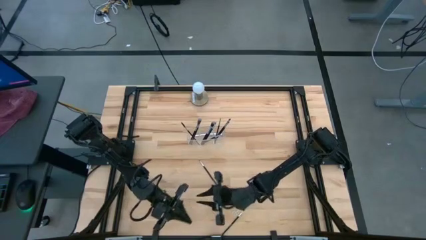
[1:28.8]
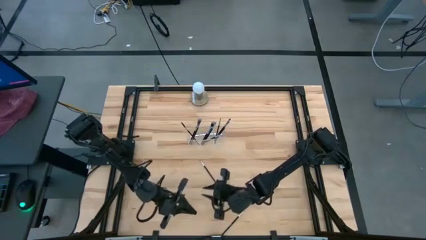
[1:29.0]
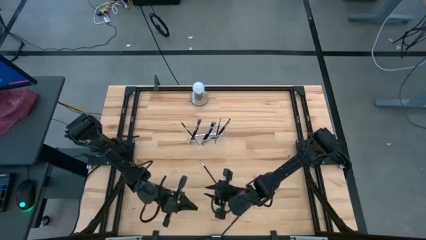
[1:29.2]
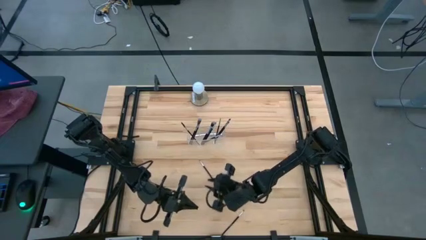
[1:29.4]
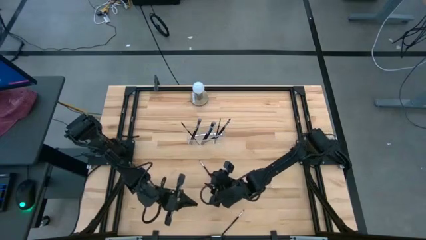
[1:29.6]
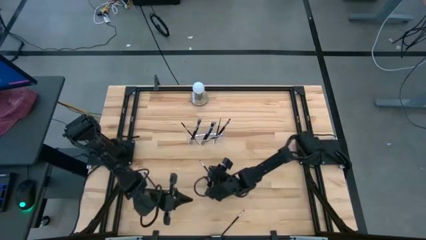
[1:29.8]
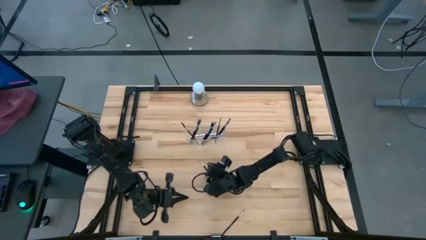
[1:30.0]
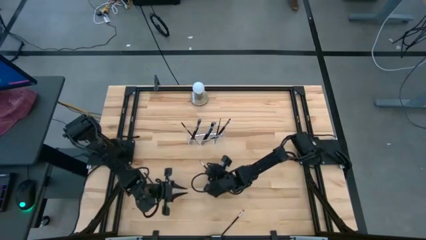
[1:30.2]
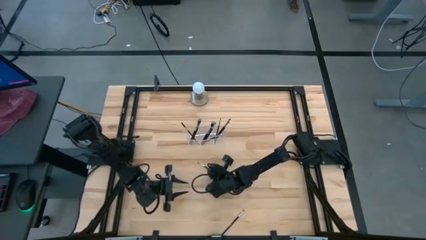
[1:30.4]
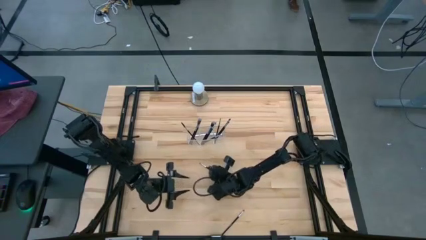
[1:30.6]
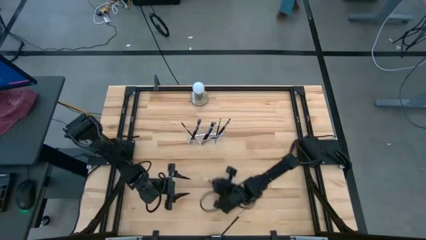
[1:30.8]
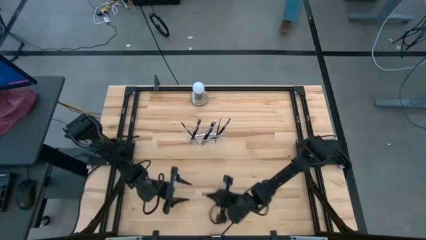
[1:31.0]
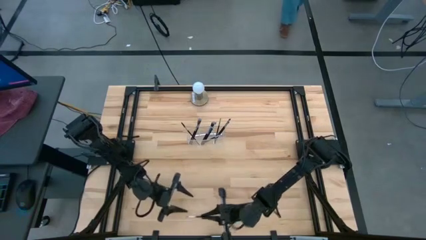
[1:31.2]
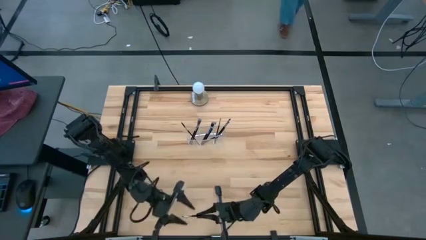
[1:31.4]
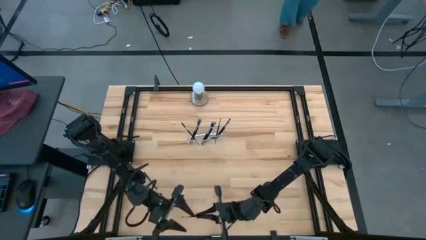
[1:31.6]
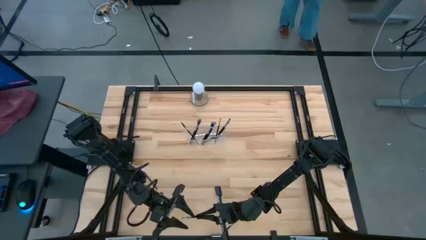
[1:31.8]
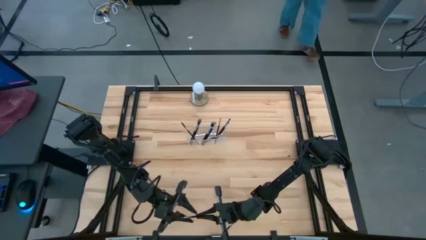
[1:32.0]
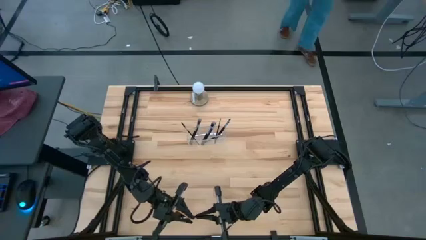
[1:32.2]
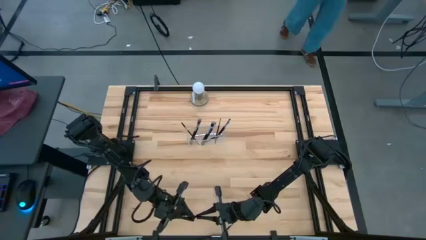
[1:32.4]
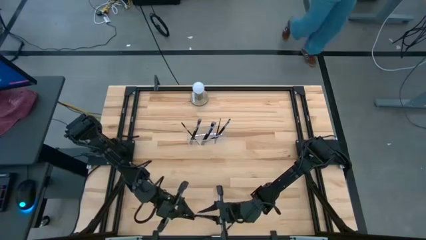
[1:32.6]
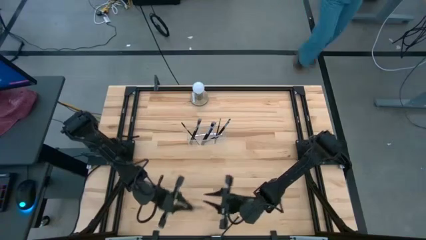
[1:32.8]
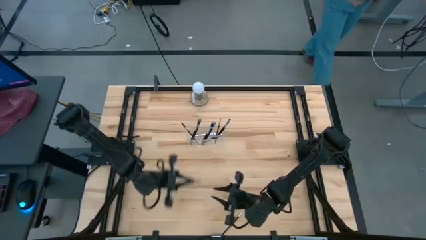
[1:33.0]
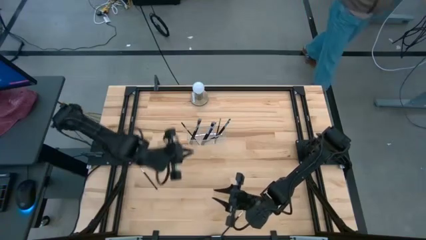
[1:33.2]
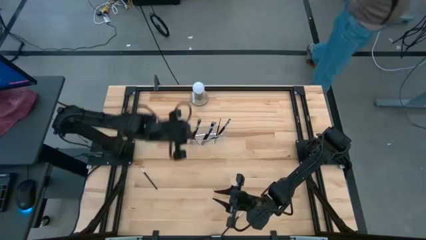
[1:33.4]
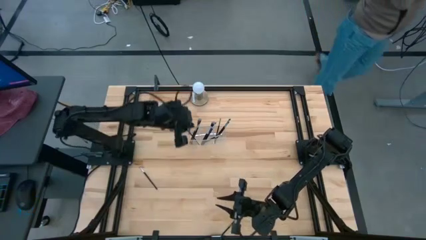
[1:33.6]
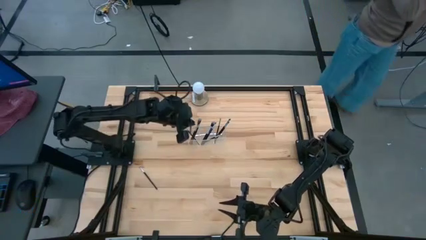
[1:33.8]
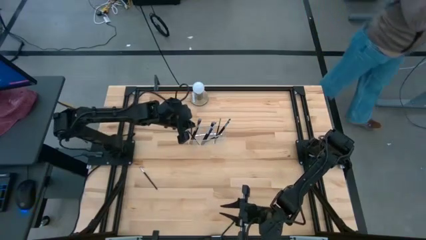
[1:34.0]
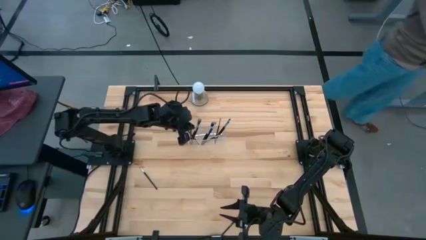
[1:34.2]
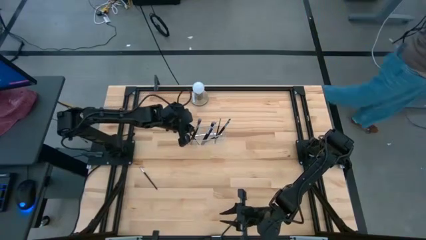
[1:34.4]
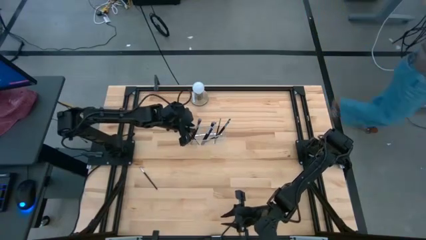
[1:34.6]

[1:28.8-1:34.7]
Task: Put items in baskets/containers
Put the eyeshadow brush into the transparent organizer

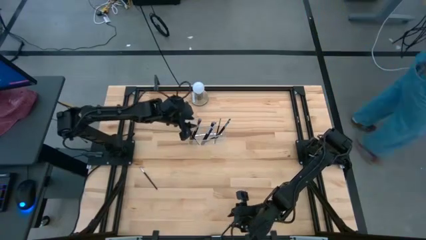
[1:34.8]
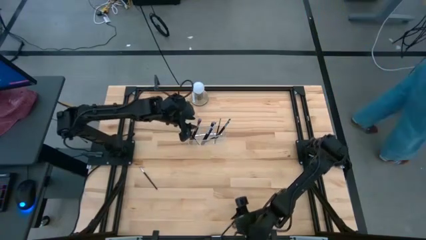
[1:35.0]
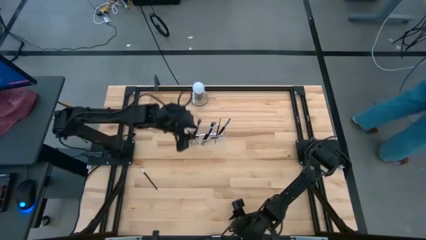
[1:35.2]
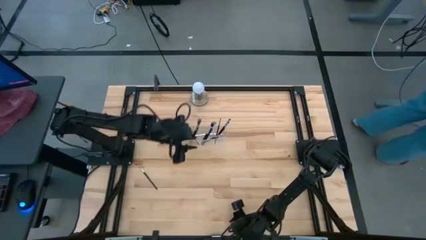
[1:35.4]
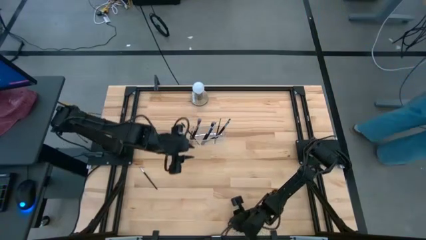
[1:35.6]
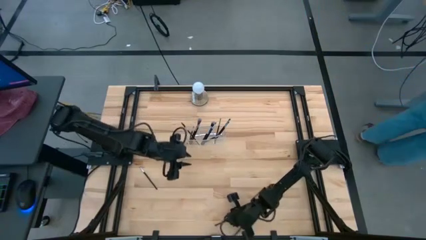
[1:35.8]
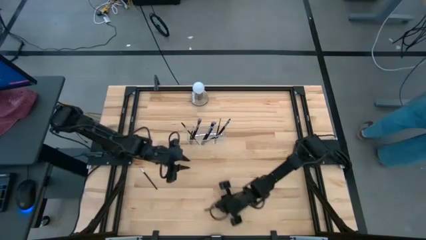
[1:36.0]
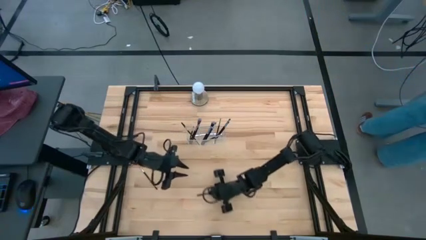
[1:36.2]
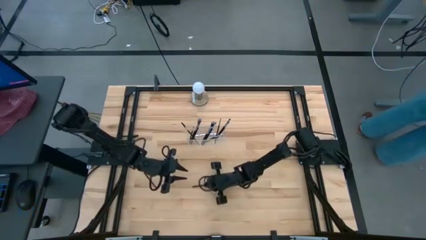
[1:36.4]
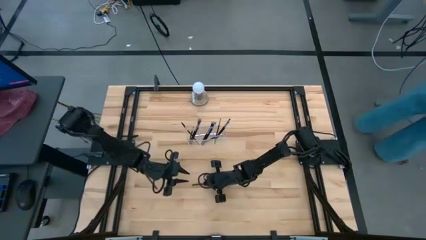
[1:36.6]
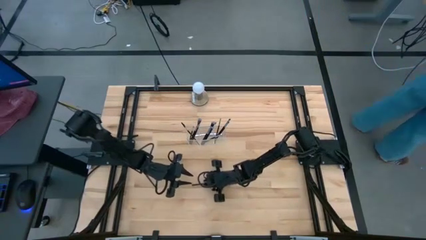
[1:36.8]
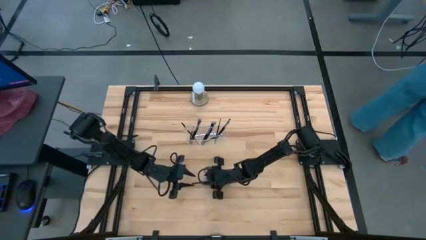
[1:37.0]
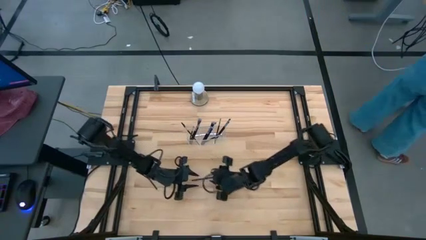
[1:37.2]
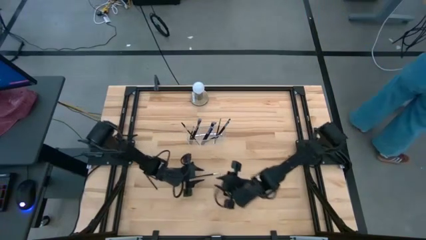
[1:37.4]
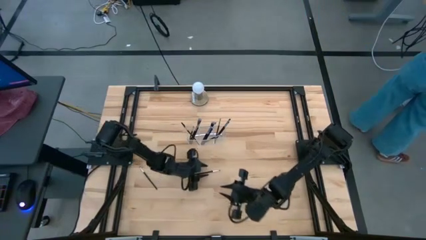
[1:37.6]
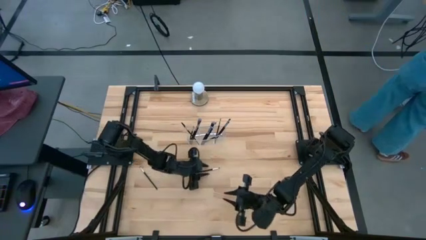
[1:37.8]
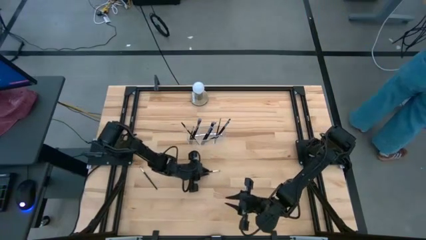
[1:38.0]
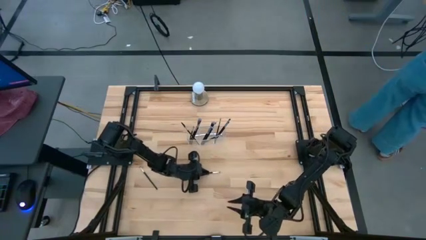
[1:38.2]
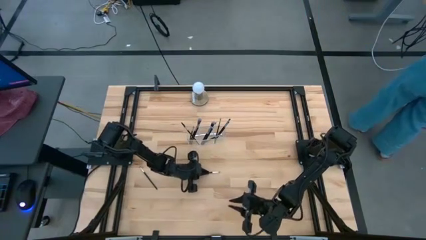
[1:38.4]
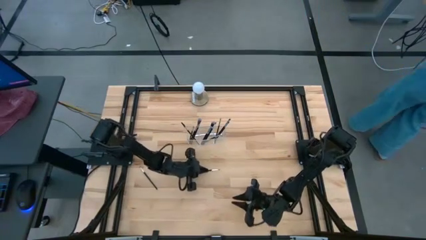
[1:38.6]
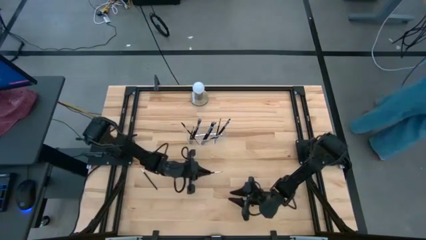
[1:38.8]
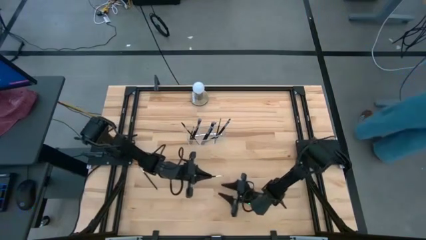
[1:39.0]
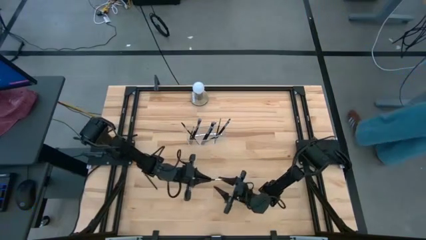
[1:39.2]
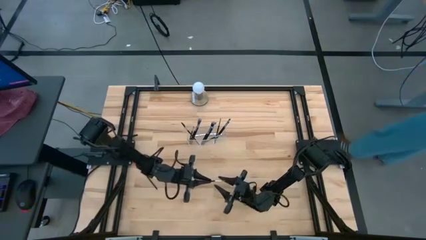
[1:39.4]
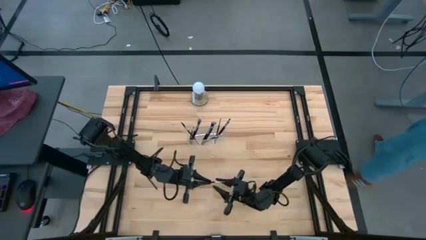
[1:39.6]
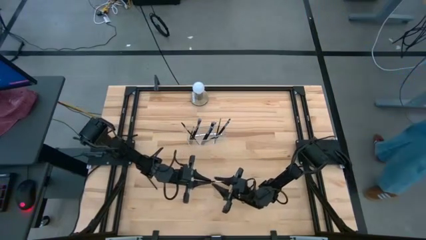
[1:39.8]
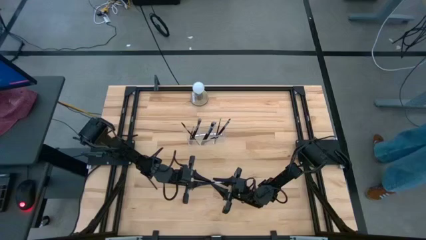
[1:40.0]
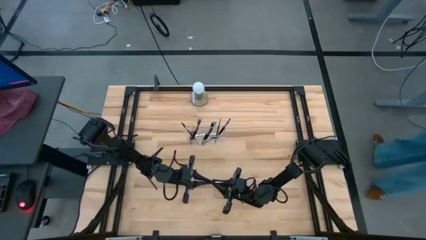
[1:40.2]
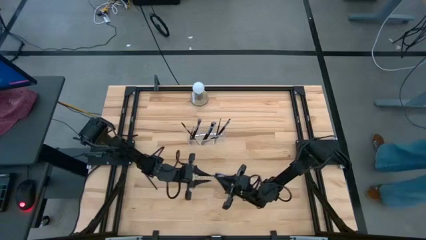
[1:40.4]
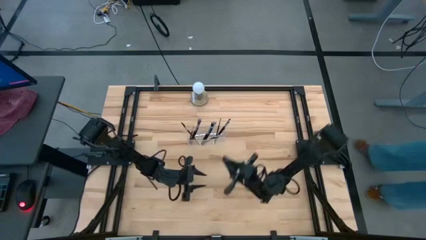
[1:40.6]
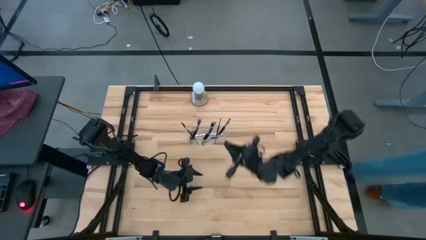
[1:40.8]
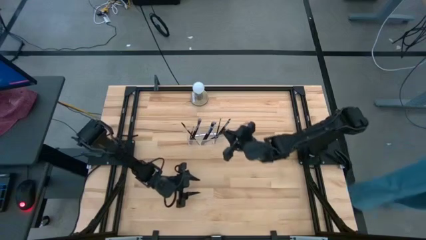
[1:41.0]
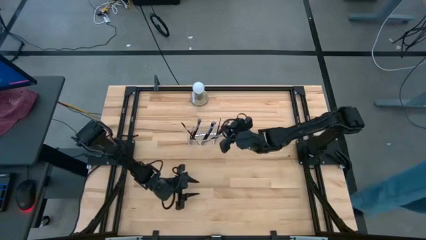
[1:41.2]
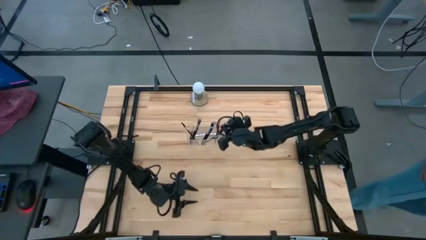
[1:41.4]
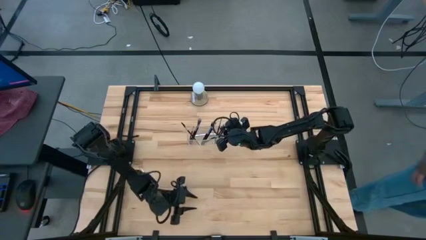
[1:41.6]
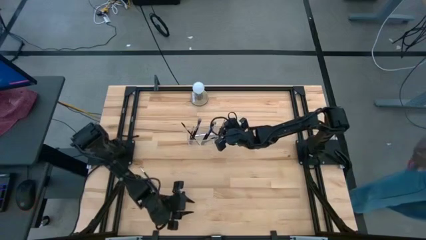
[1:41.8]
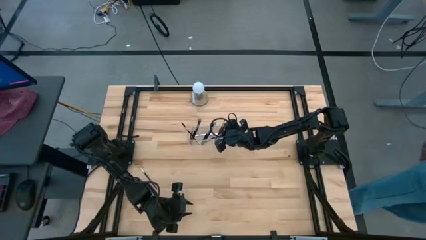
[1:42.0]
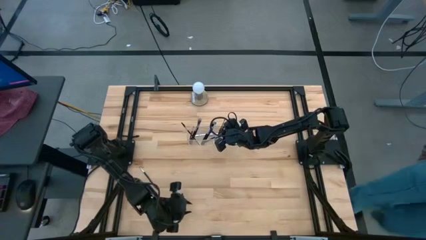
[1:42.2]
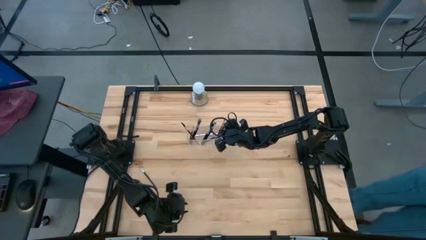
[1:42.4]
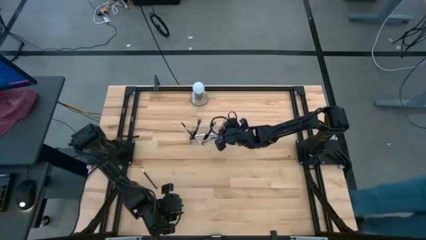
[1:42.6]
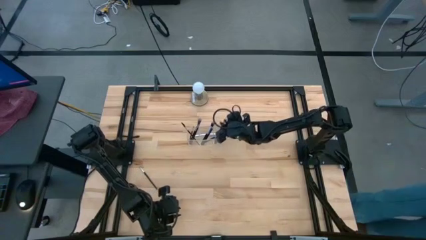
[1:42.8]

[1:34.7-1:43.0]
Put the eyeshadow brush into the transparent organizer

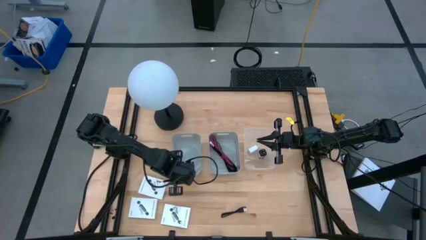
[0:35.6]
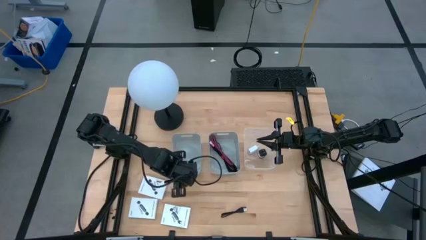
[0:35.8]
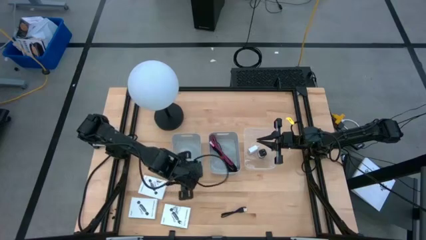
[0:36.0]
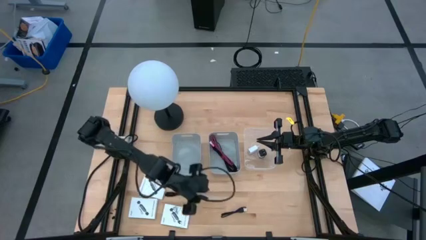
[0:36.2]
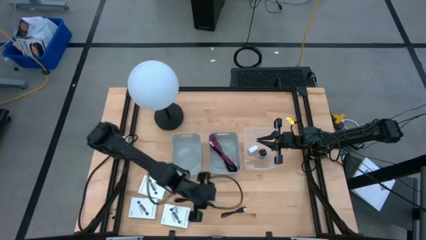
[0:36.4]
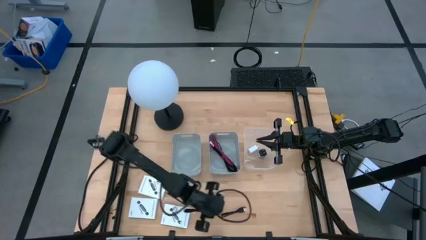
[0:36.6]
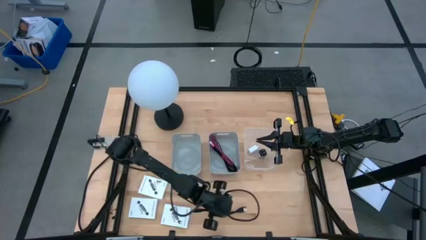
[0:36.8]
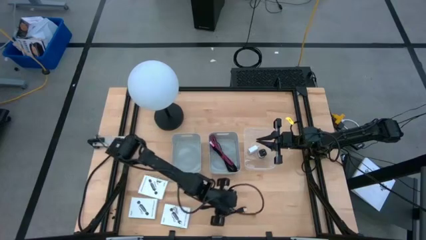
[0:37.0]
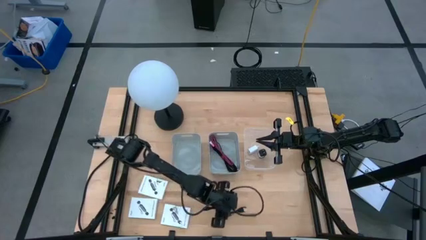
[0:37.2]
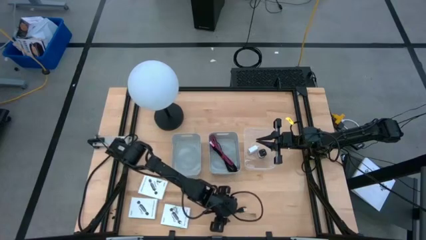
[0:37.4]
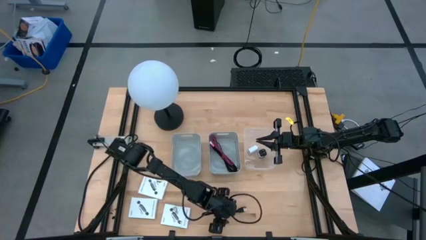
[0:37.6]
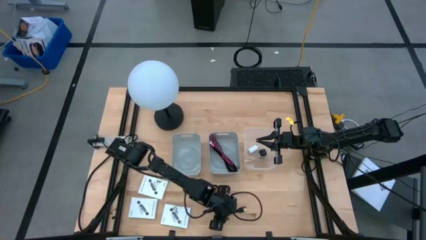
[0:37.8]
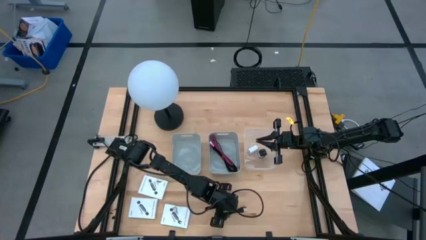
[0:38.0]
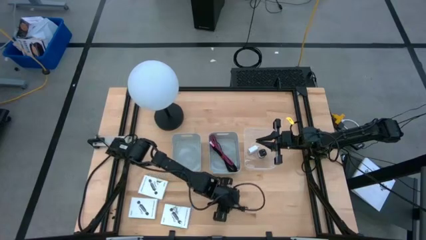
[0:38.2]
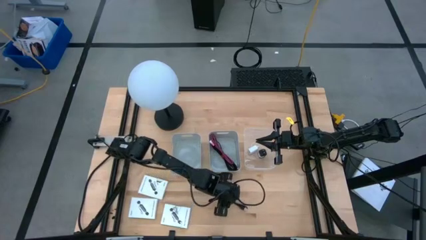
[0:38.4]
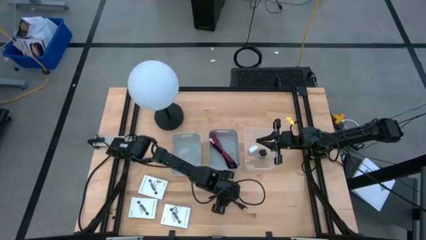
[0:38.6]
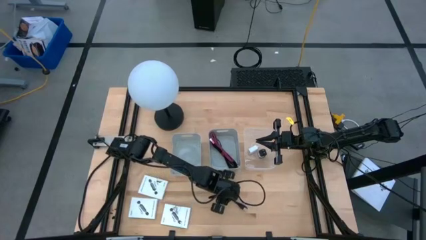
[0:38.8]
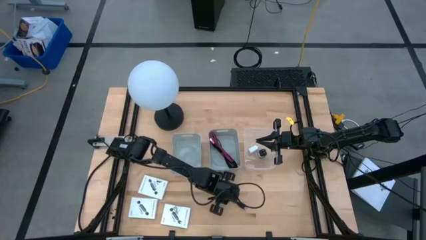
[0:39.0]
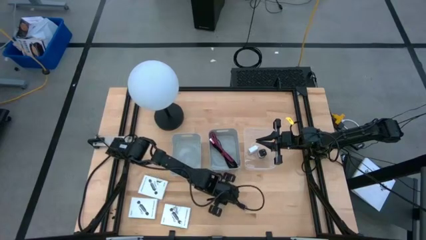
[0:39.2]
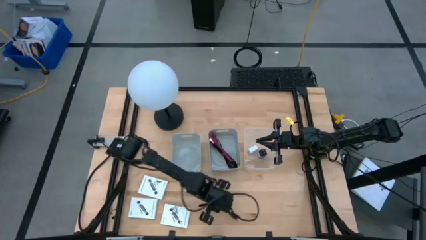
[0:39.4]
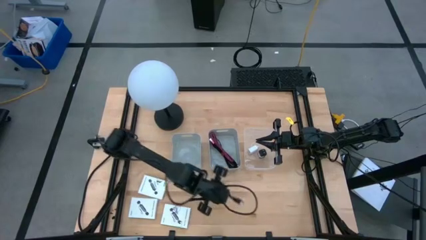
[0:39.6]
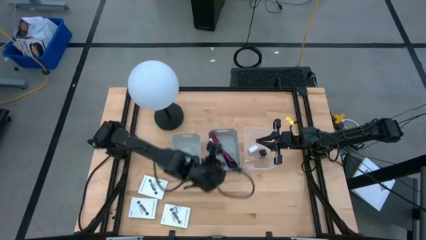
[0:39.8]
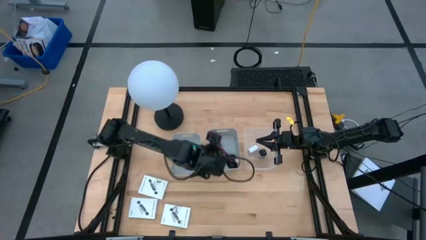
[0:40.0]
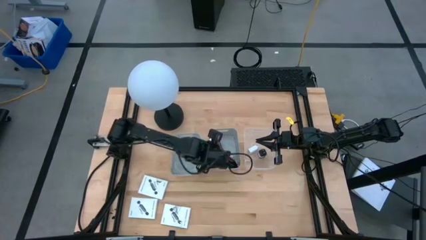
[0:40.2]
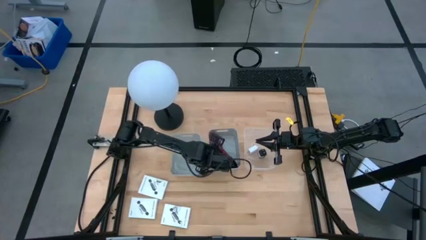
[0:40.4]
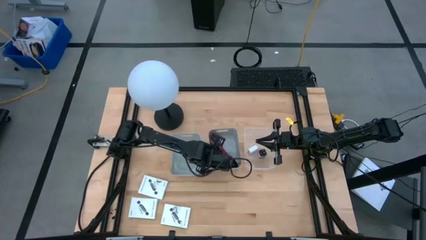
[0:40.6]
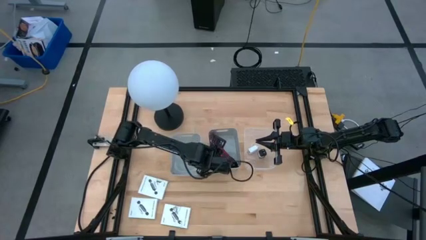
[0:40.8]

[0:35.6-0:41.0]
Task: Pick and place items into bin
Put the black charger cable into the right gray bin
